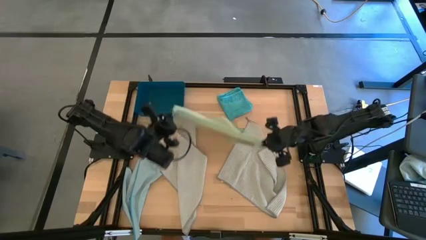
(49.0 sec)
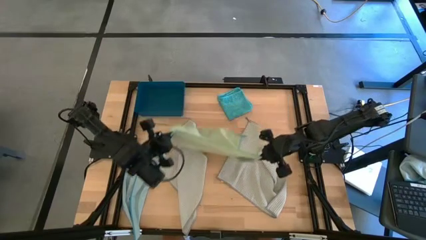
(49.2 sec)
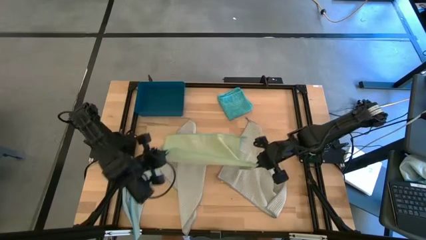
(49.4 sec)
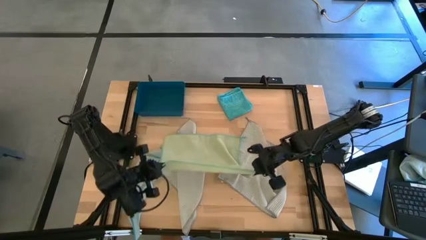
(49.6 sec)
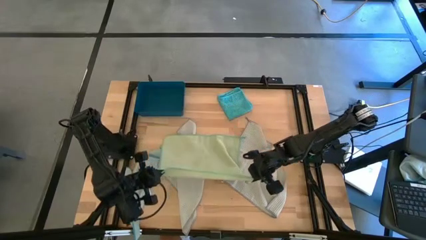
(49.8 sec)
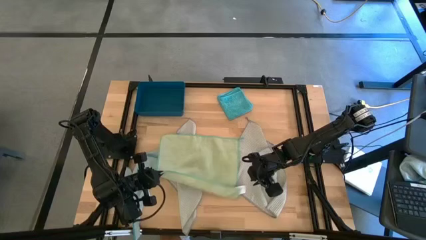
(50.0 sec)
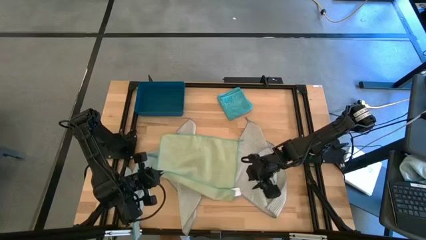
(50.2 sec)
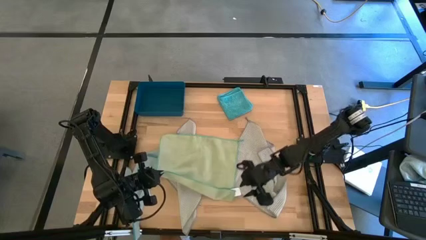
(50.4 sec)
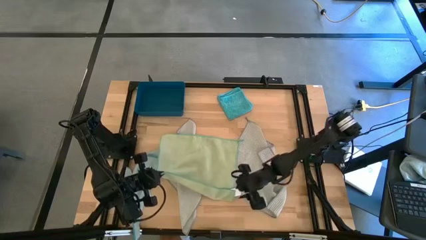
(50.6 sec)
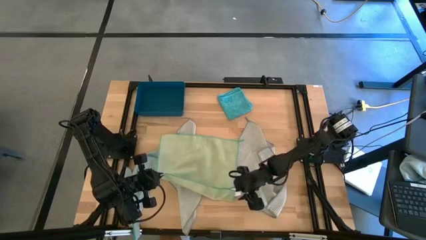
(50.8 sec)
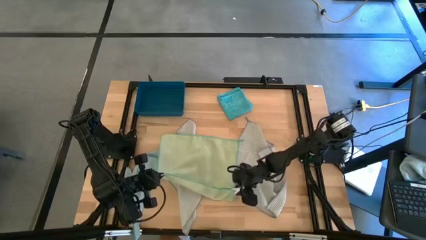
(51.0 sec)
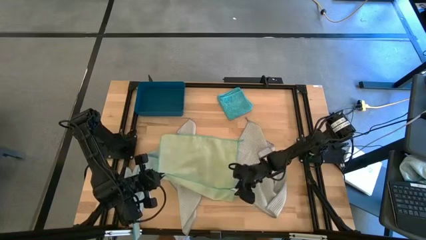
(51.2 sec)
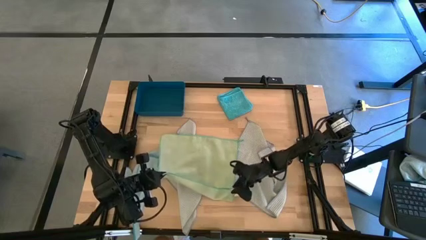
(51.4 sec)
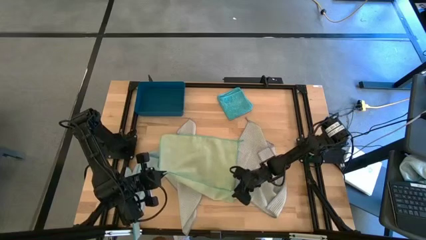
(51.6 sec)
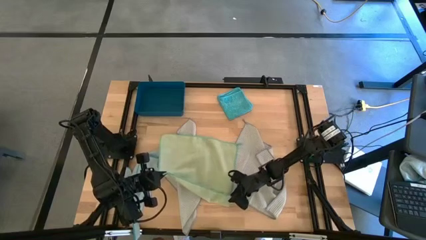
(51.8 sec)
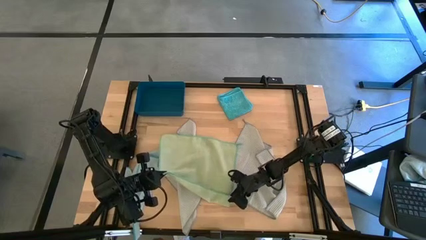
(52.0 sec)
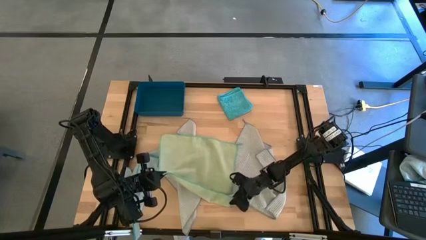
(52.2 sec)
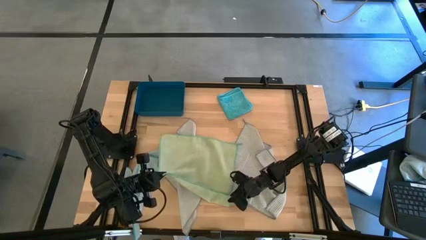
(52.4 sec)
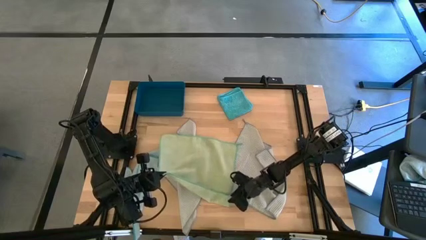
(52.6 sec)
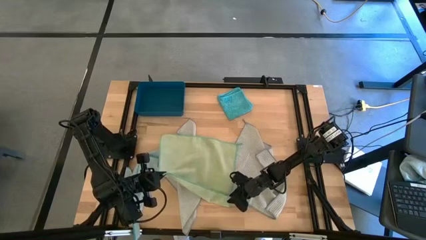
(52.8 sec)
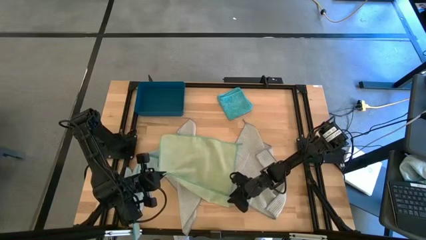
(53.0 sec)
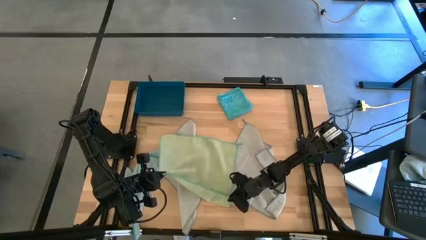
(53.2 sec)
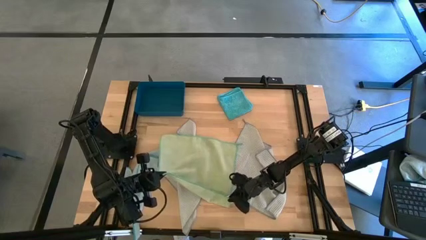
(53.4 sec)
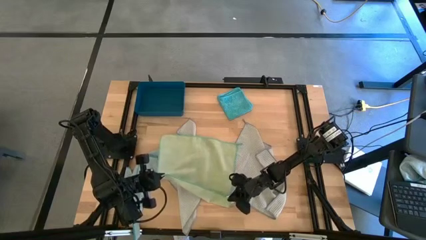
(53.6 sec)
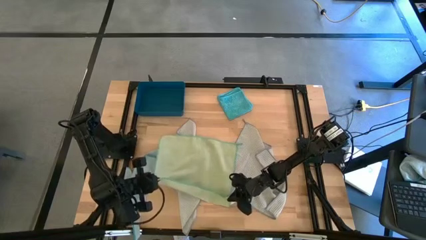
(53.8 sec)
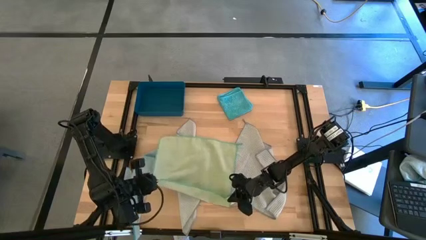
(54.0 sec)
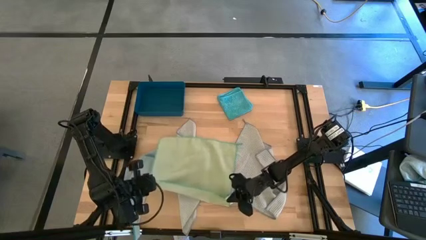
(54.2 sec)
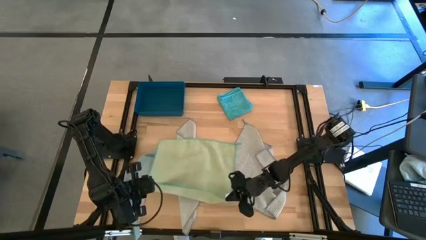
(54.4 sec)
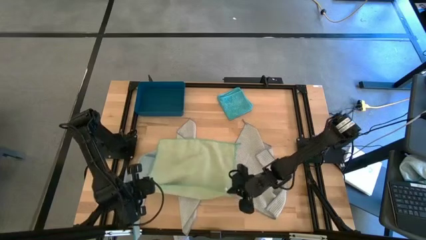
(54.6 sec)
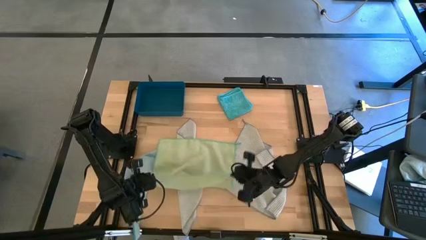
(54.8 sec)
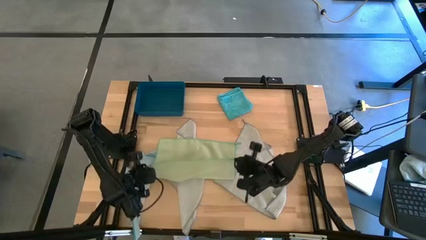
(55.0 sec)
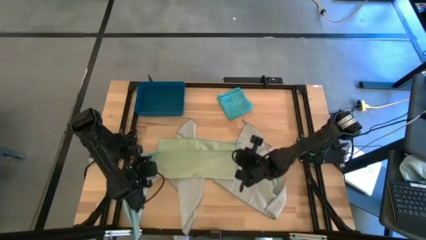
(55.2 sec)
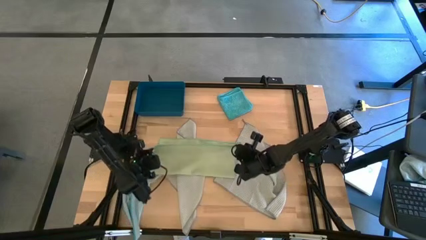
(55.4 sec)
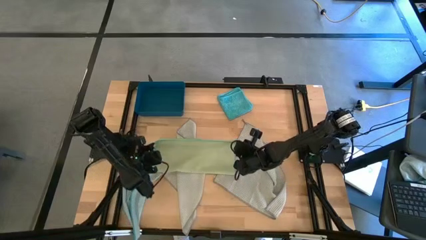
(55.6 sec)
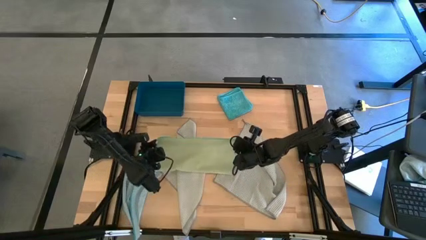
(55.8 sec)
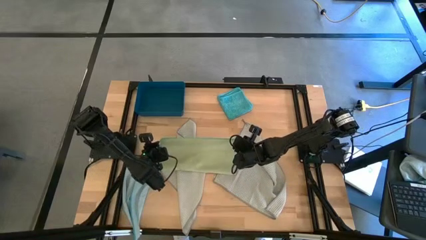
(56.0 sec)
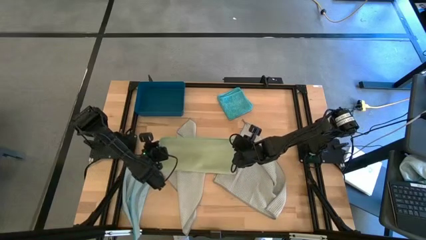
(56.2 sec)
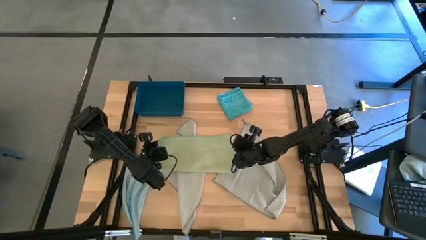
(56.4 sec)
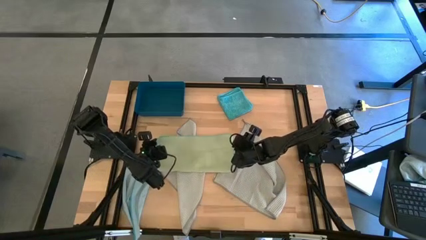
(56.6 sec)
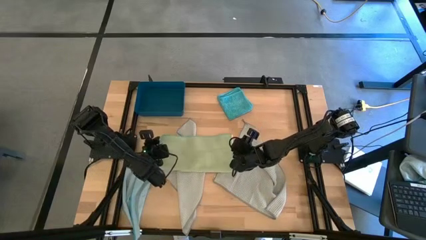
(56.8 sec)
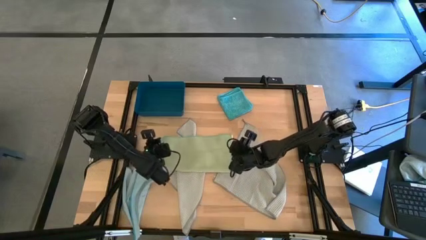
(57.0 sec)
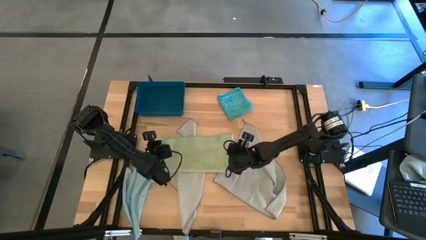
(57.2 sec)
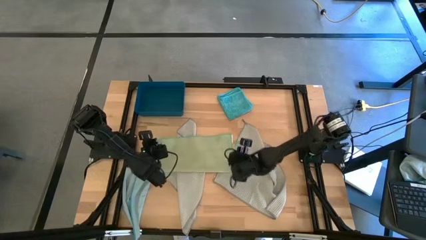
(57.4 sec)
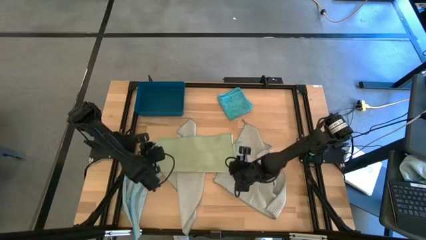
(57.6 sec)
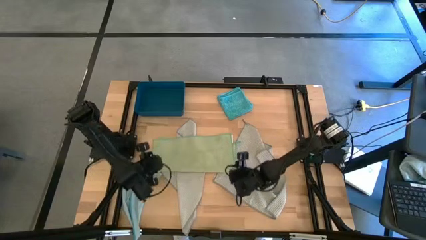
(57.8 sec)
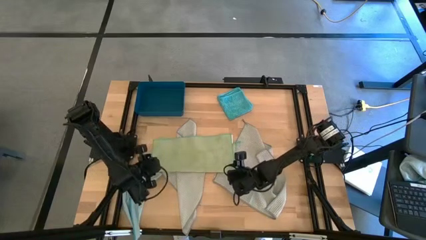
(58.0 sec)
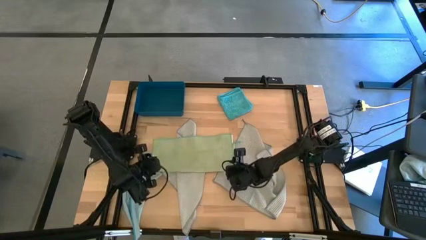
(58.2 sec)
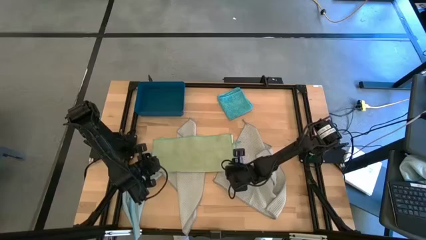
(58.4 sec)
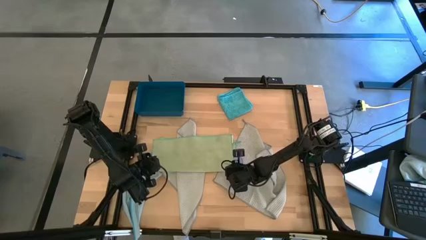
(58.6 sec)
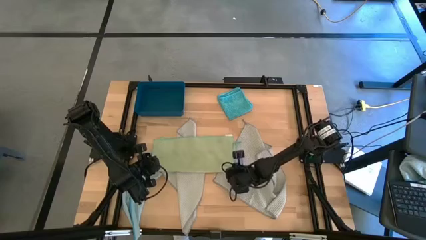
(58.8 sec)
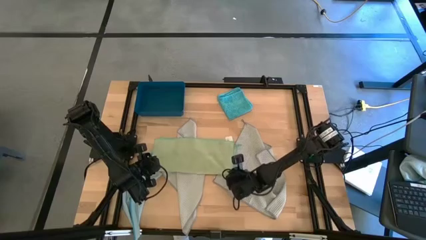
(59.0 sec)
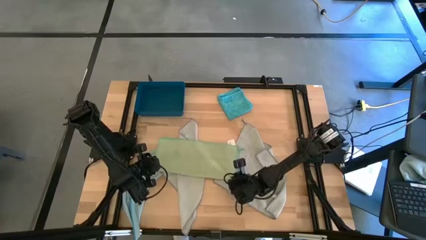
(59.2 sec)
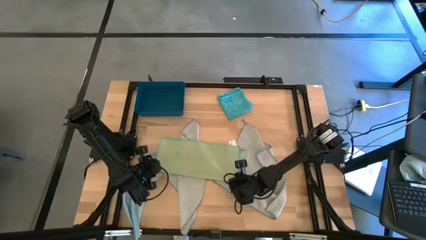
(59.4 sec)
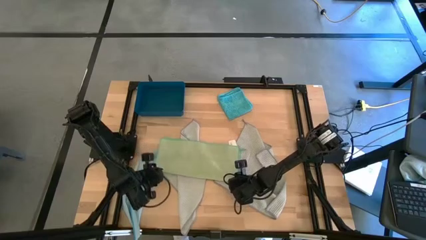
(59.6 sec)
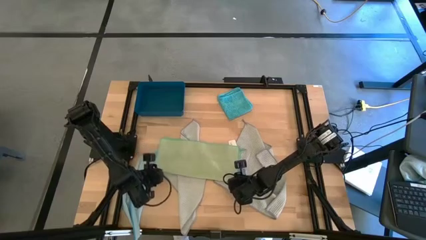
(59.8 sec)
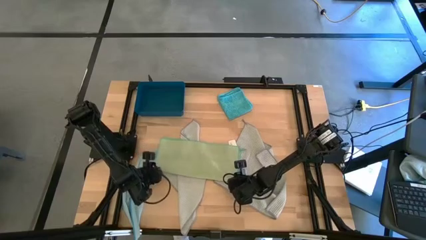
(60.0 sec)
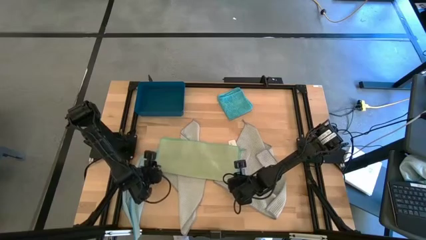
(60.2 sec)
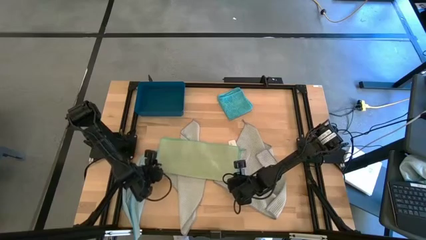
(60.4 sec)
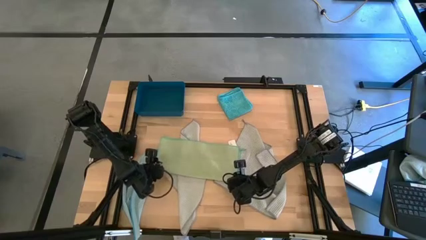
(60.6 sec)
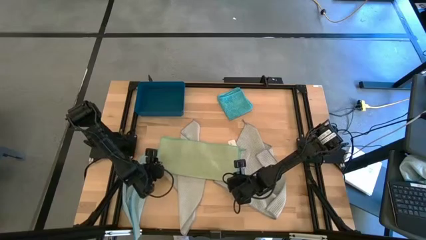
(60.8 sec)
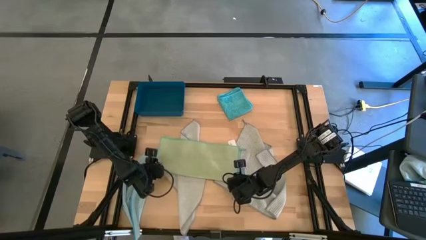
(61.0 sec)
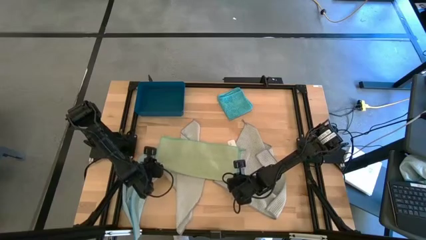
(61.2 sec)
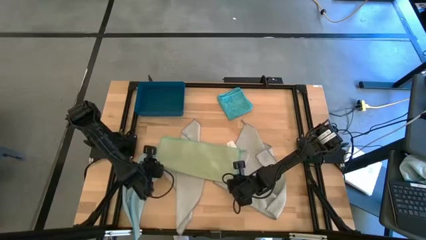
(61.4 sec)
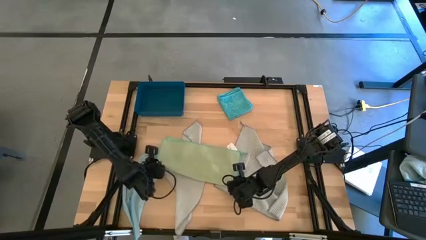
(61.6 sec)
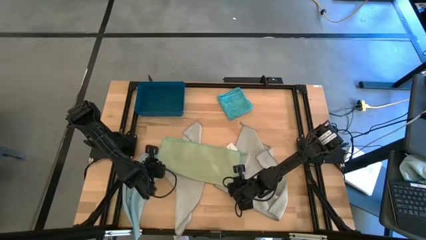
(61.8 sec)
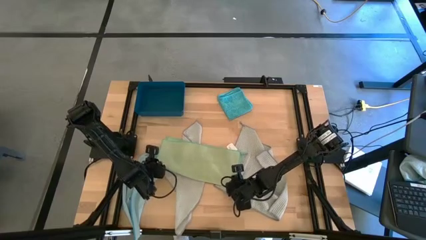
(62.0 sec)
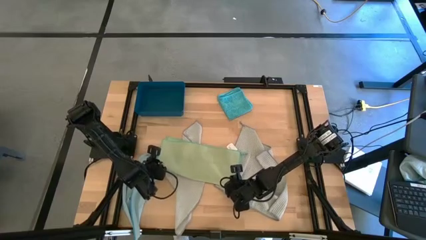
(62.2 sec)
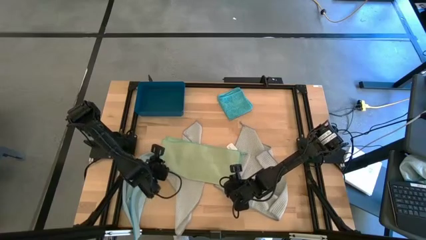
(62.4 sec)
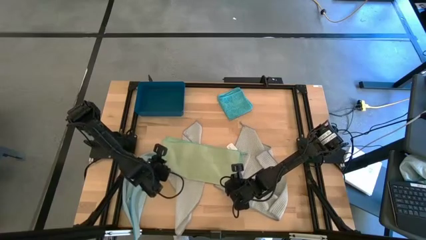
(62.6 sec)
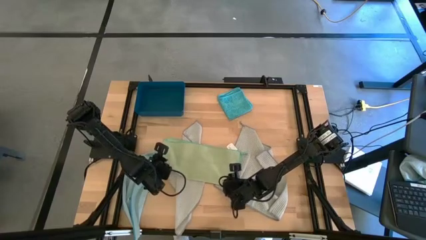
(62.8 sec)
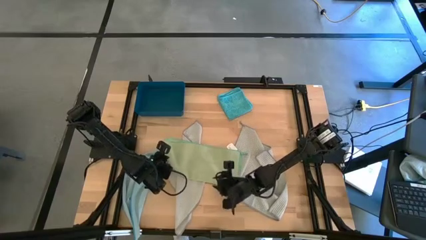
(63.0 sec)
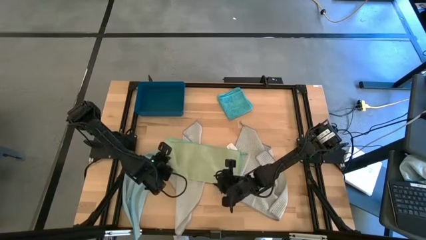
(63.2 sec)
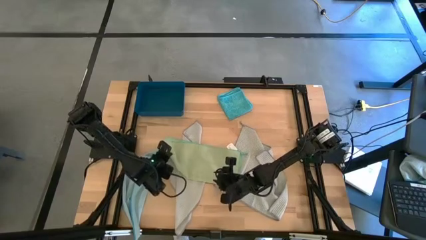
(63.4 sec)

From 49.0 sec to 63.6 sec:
Task: Fold microfiber towels
Fold the green towel
